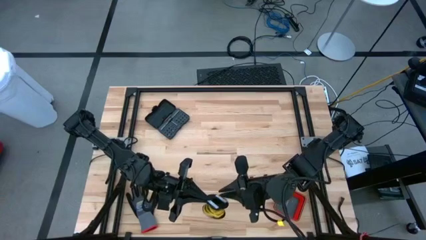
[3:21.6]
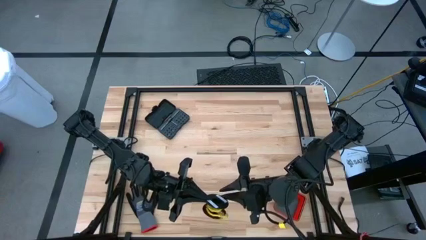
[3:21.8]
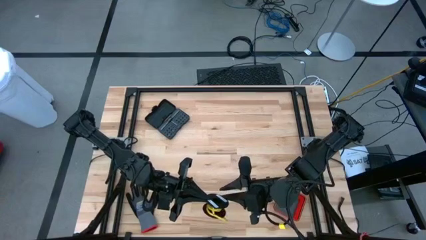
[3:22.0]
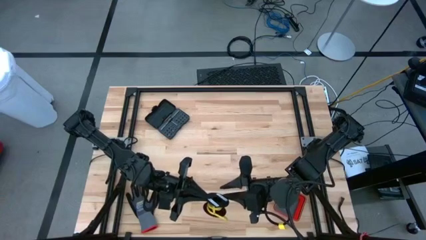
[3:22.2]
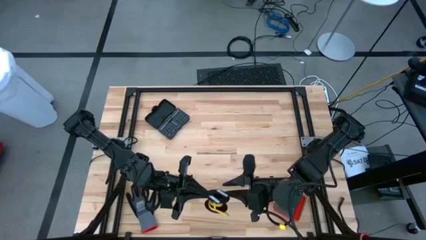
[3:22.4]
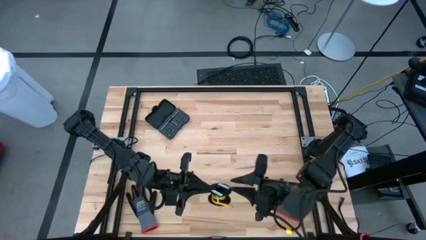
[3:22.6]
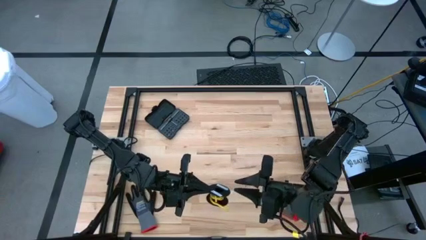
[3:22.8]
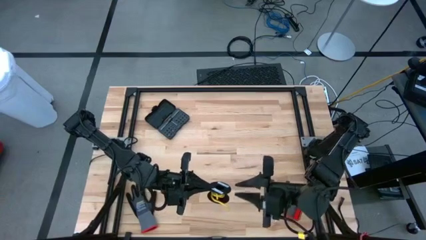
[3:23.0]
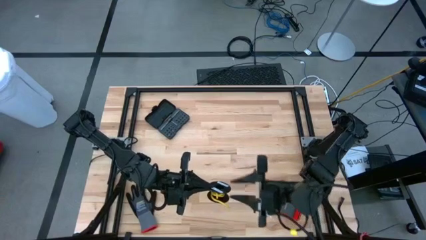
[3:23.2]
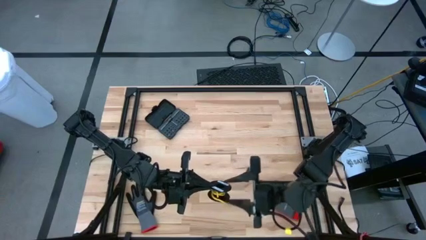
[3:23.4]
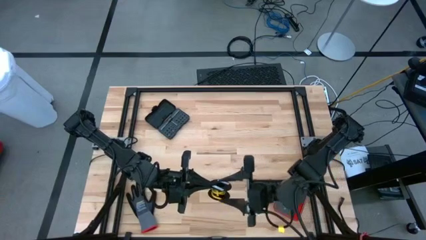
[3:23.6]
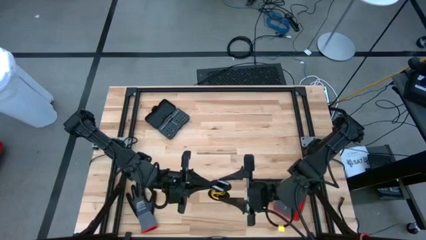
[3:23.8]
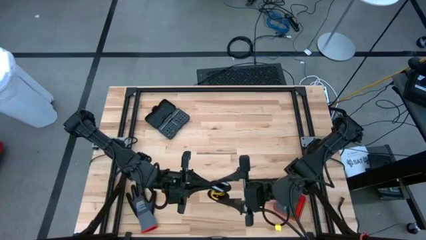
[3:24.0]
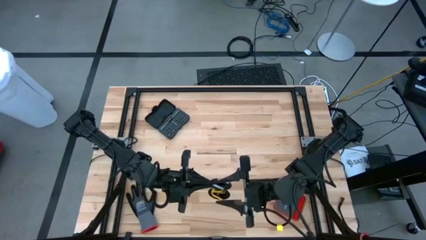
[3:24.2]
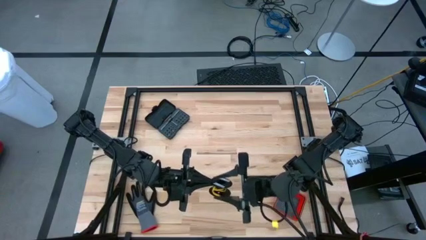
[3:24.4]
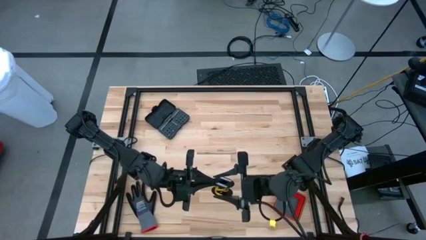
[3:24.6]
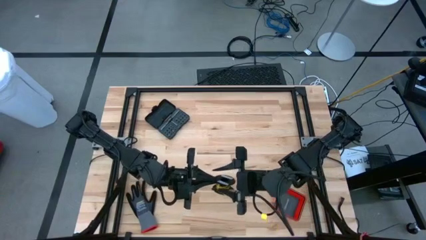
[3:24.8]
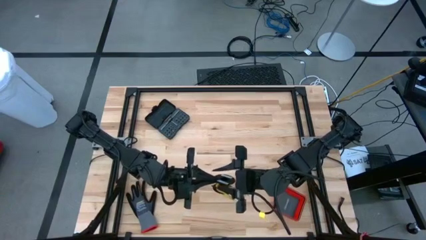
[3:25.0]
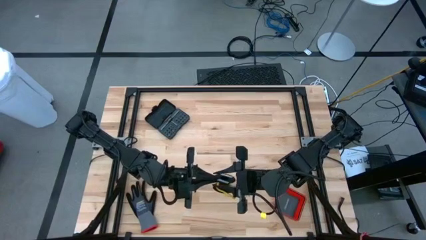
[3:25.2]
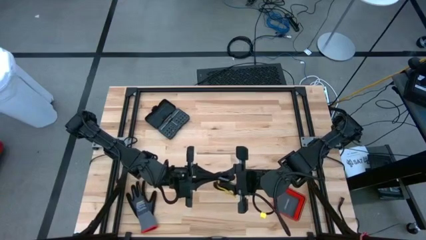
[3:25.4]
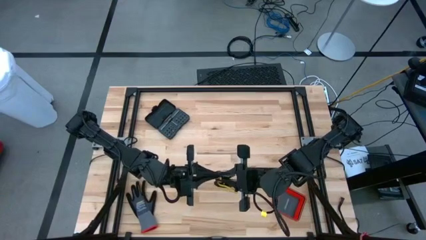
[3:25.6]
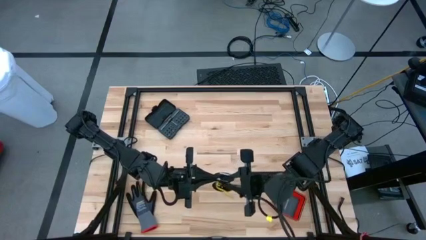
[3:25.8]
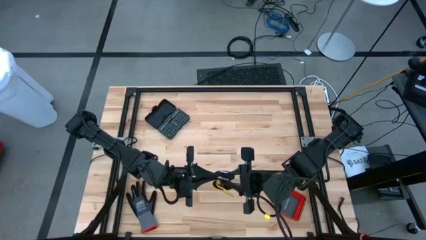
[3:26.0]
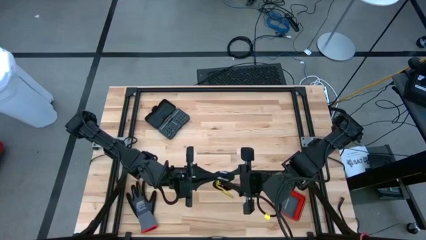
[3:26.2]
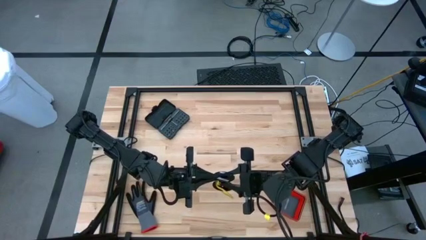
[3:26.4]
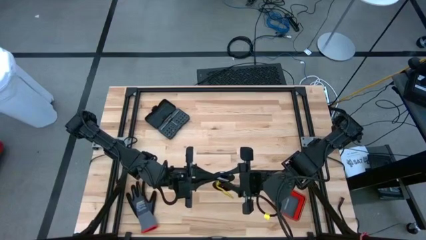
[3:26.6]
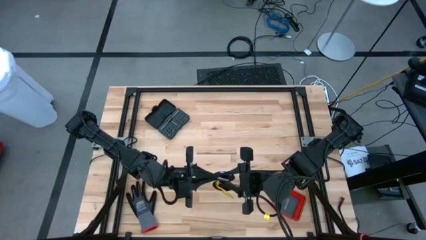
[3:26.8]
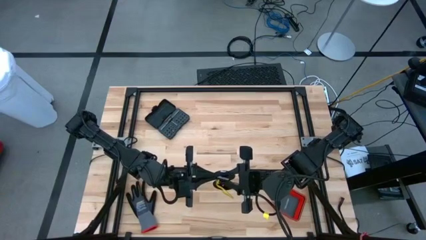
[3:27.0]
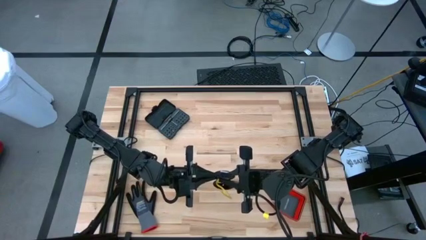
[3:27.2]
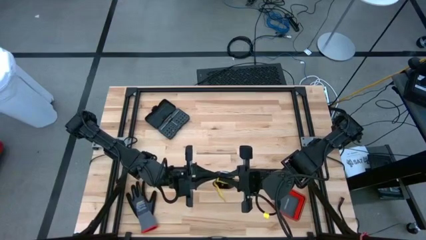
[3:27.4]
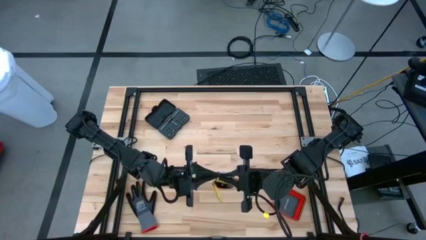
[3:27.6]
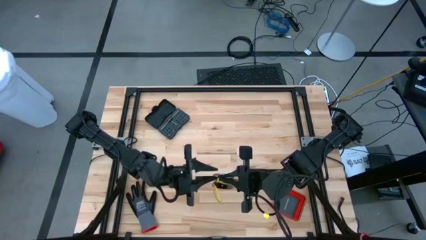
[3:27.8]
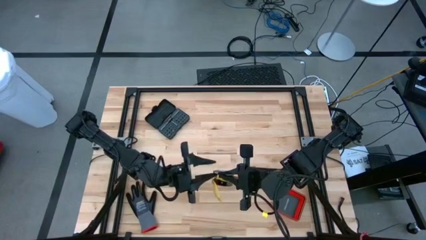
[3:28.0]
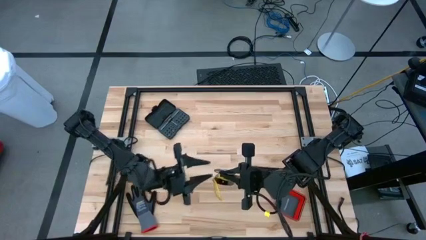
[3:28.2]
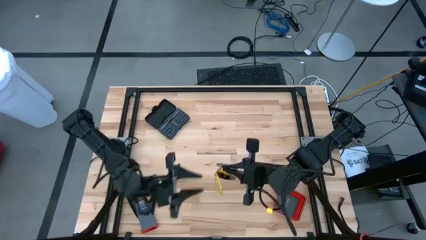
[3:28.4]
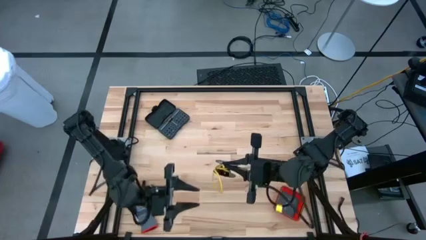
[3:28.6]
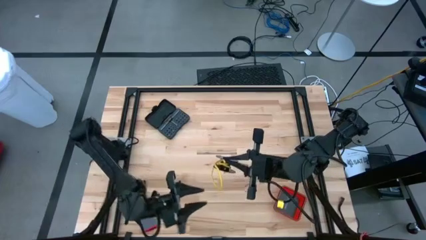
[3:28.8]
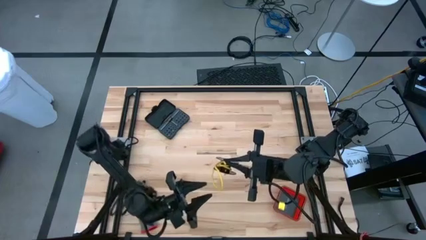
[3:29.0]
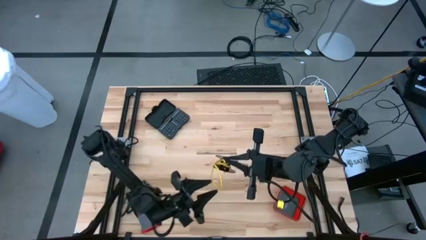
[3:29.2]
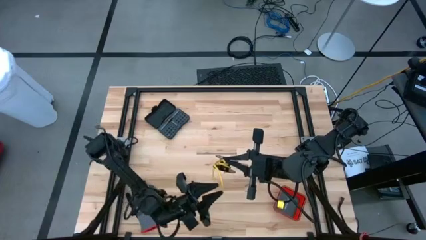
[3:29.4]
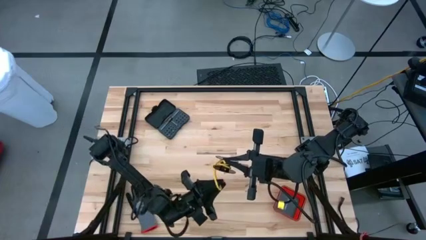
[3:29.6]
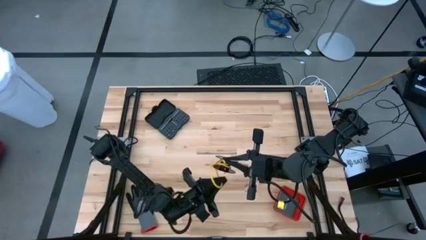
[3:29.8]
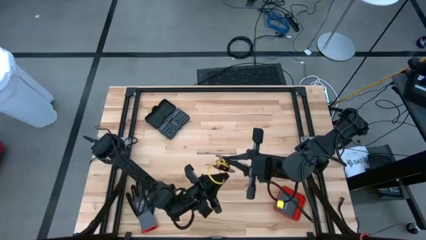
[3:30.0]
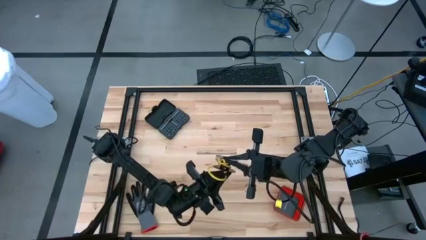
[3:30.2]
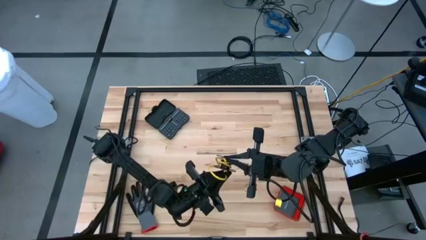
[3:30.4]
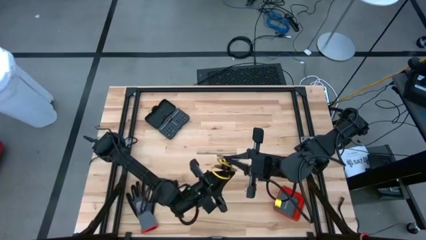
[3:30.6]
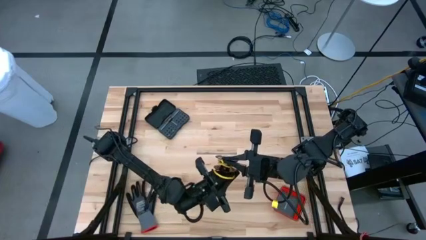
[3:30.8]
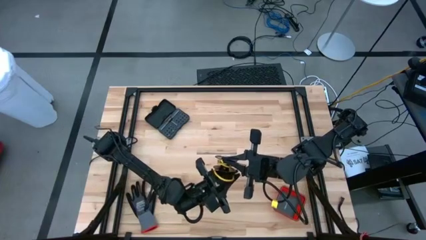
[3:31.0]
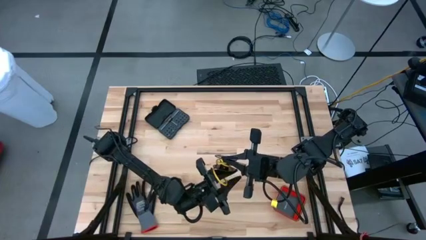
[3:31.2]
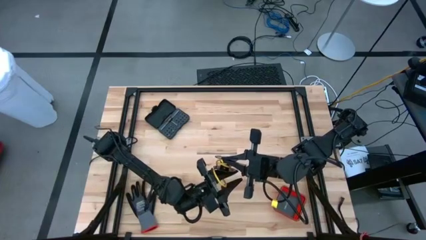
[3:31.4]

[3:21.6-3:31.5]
Task: Coil cords
Coil the yellow wire onto the spool
